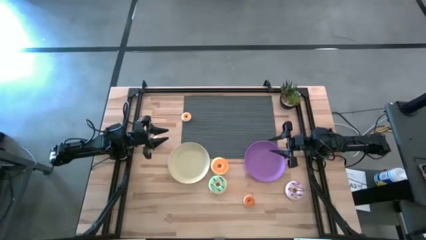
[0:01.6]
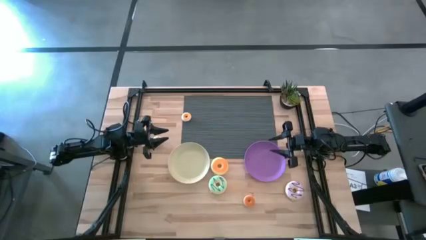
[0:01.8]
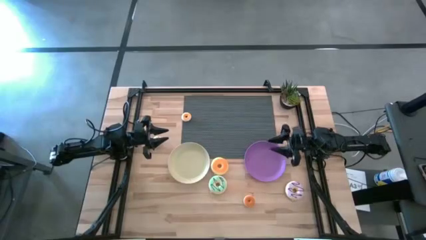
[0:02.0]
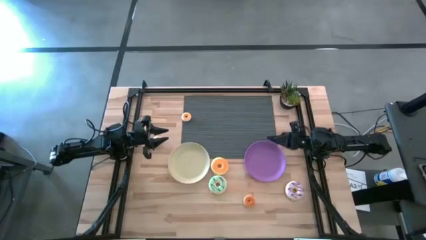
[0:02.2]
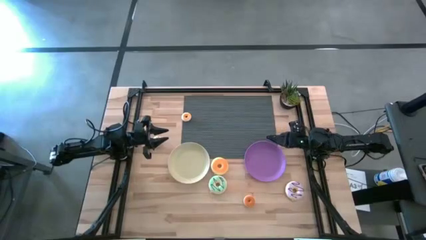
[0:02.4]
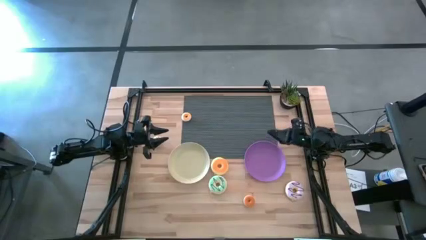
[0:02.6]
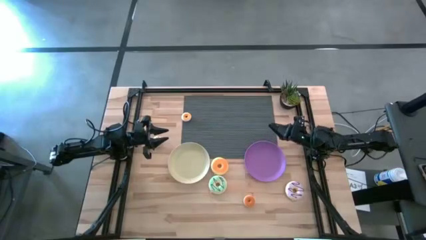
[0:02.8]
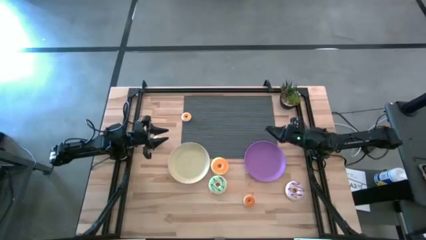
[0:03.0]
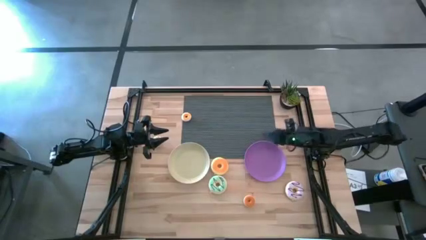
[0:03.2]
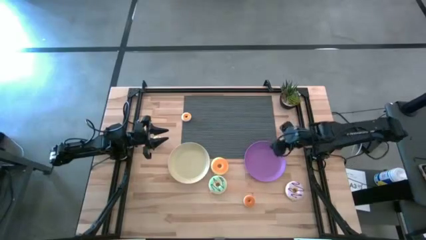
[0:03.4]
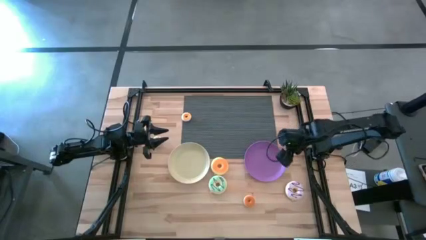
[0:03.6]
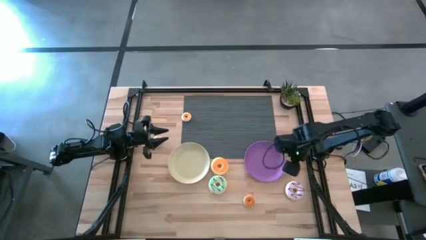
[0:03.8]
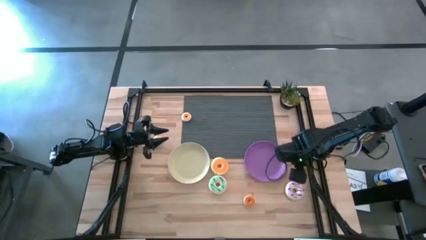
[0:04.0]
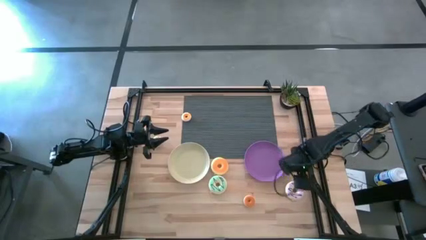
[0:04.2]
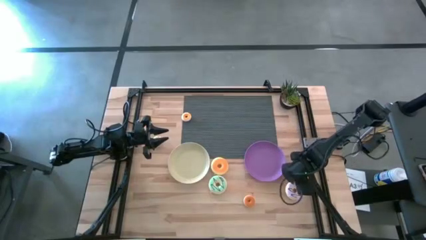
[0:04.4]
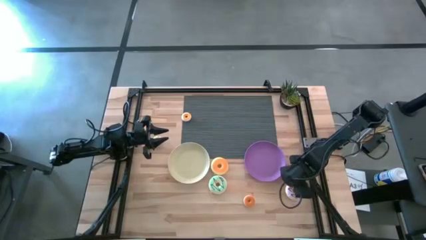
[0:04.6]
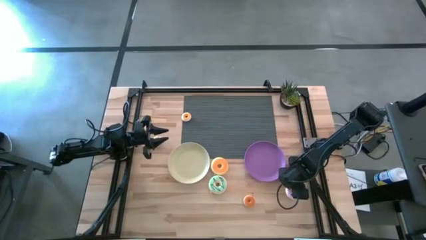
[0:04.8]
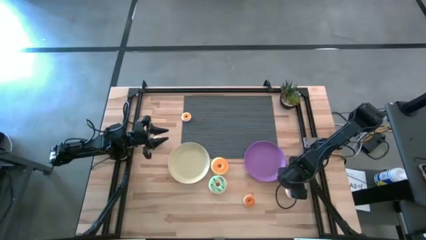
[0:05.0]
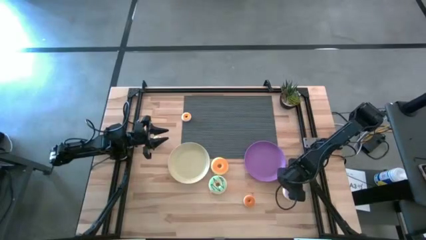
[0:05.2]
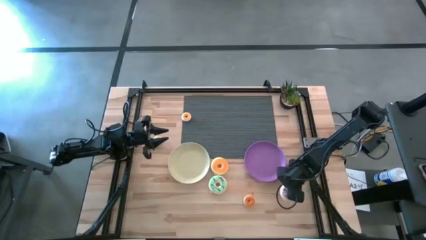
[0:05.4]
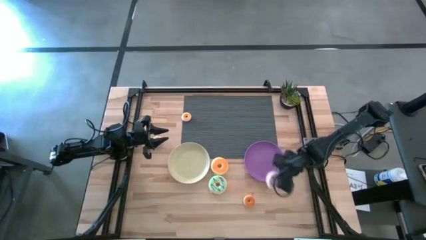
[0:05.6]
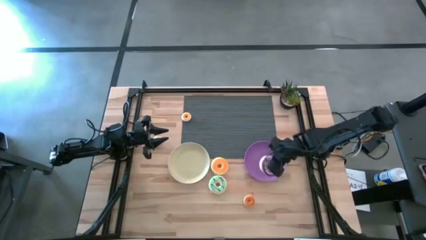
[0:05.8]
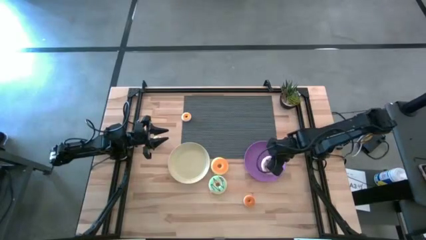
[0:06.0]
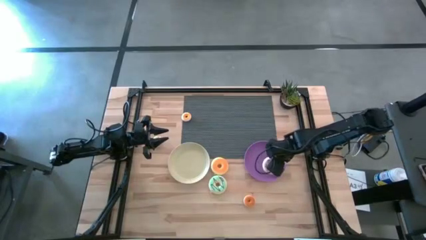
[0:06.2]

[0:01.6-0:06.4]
Task: Pick & Place donuts
Put the big purple donut on the purple plate

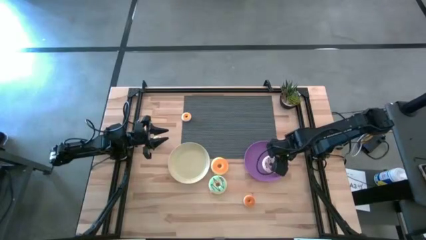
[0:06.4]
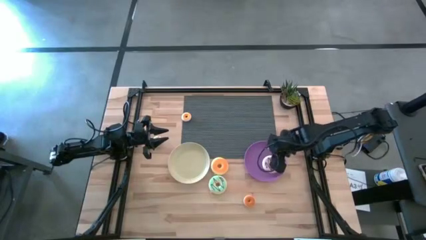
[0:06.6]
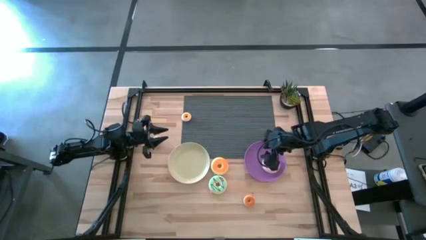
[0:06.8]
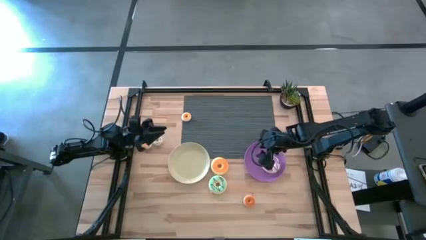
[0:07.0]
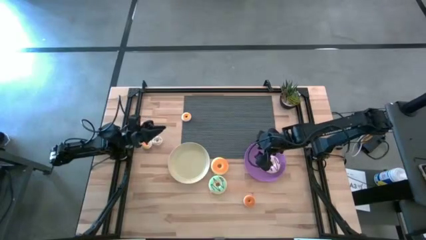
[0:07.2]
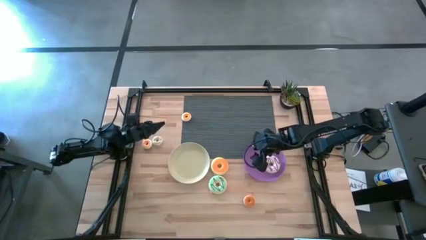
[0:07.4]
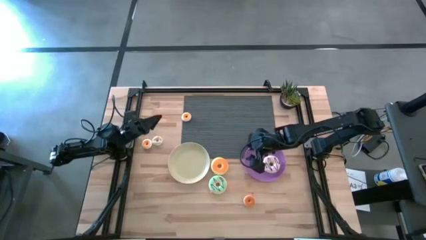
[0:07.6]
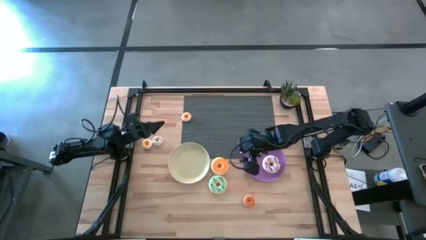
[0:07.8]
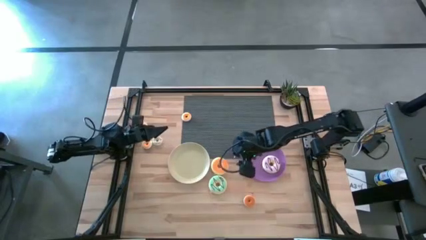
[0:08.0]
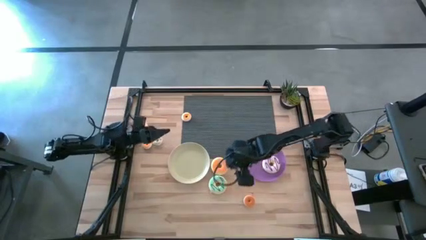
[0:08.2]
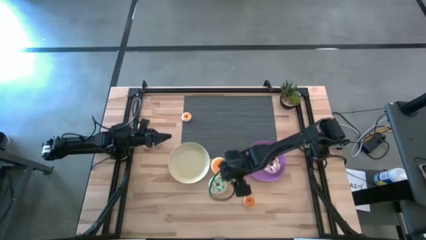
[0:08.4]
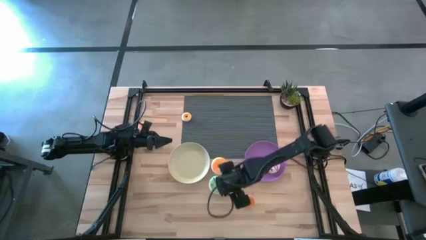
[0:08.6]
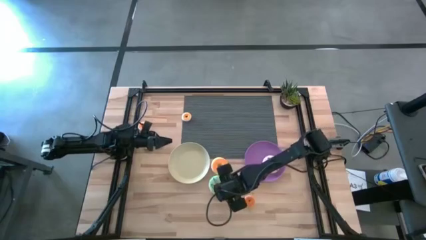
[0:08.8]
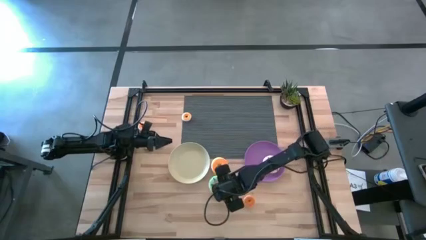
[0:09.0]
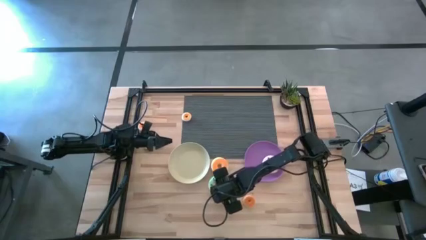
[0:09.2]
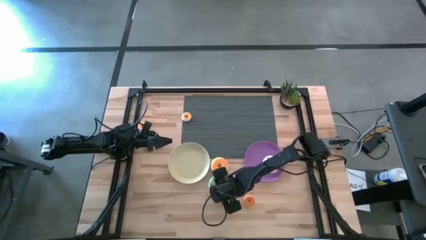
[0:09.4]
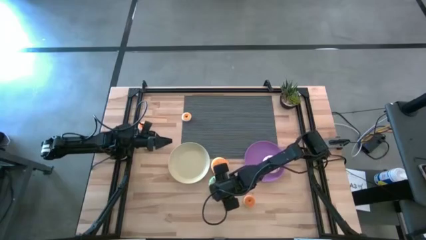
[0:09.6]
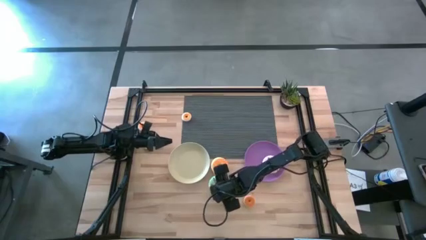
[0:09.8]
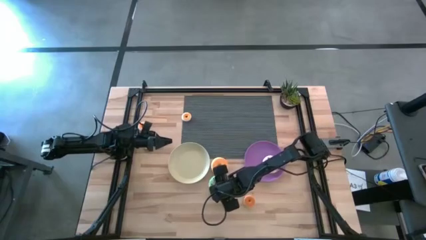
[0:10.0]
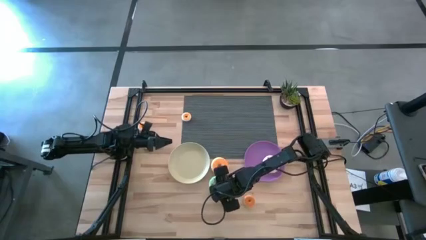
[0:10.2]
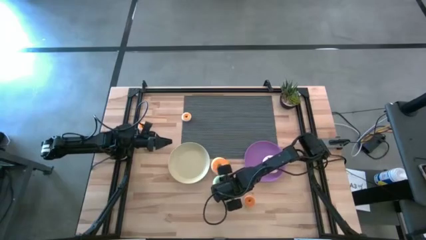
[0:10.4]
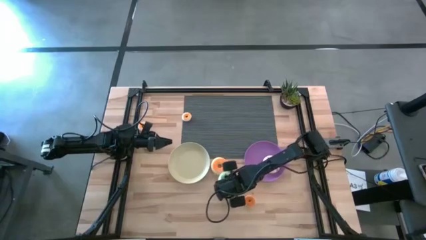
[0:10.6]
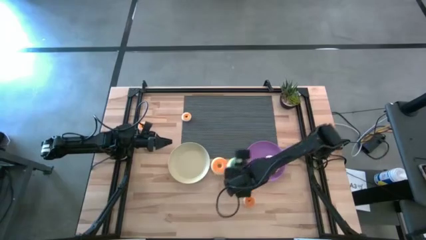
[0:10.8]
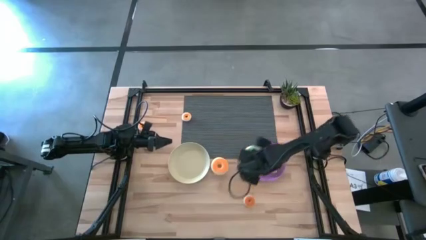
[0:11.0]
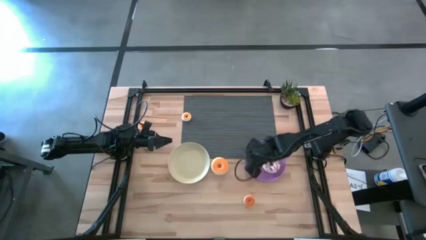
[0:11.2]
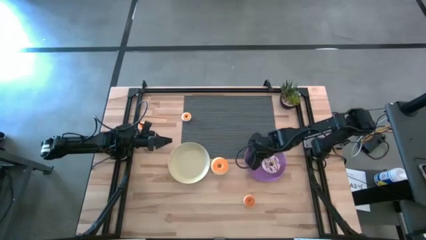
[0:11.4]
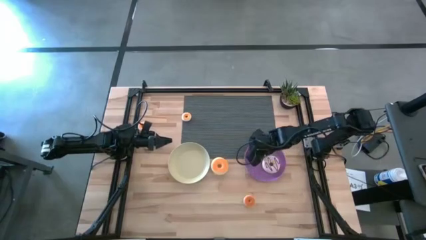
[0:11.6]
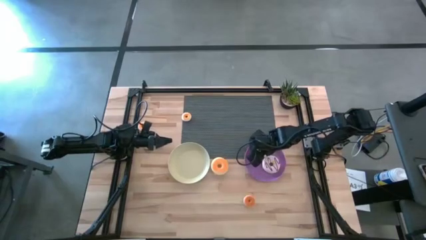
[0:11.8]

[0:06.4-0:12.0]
Put the big blue donut on the purple plate

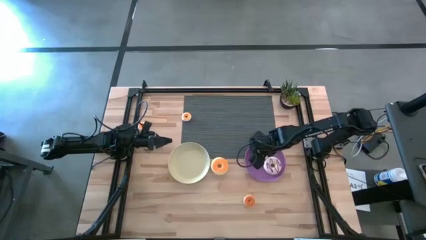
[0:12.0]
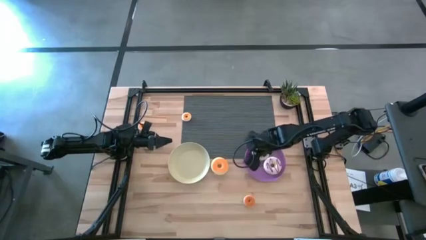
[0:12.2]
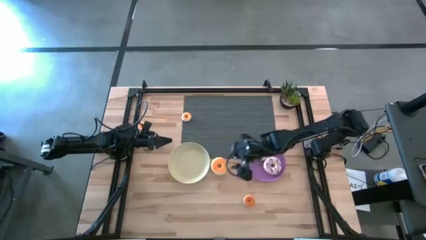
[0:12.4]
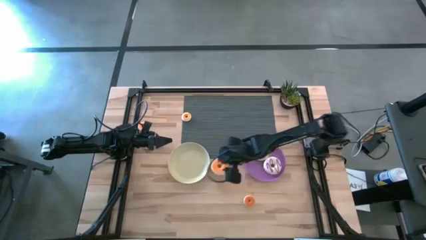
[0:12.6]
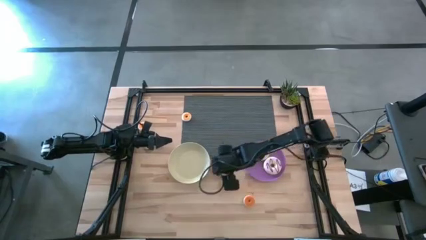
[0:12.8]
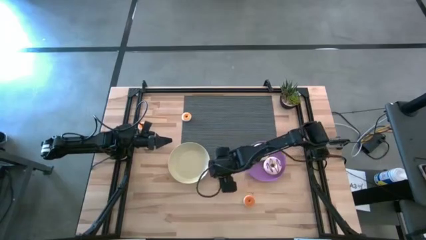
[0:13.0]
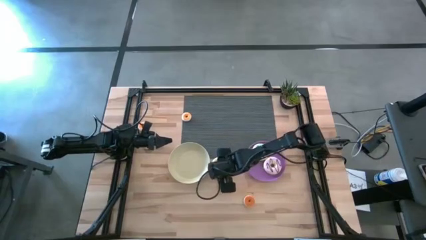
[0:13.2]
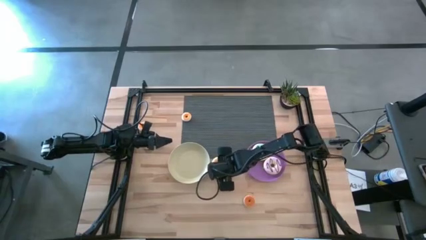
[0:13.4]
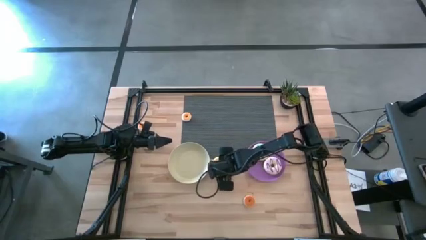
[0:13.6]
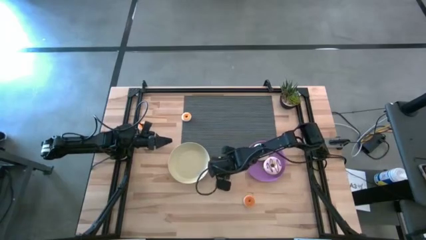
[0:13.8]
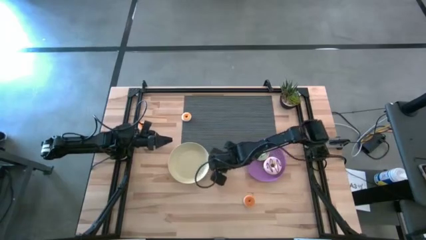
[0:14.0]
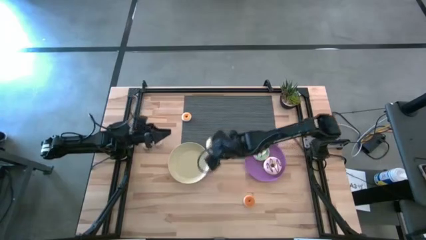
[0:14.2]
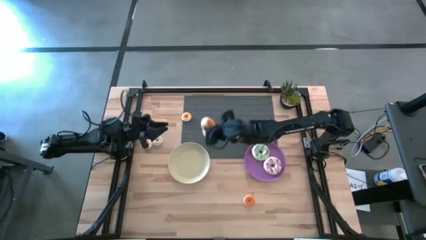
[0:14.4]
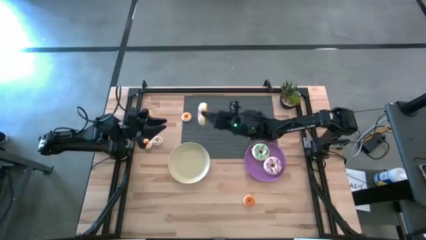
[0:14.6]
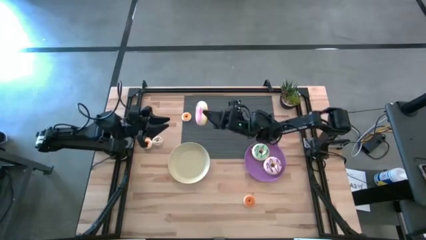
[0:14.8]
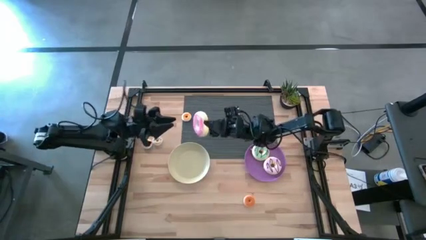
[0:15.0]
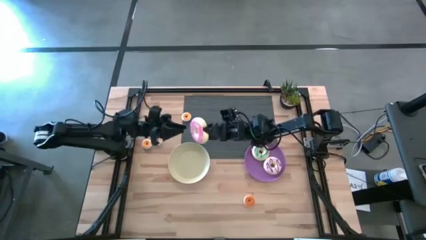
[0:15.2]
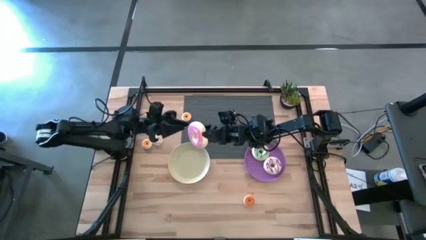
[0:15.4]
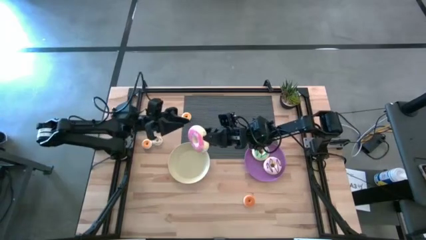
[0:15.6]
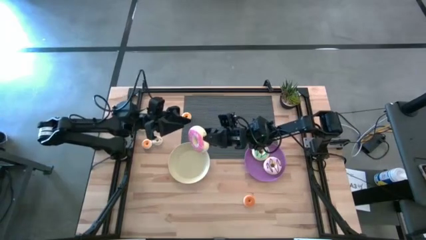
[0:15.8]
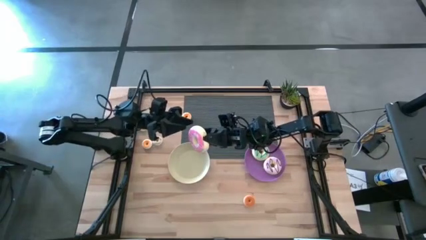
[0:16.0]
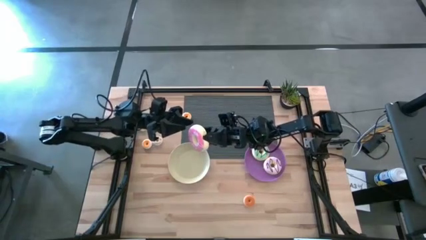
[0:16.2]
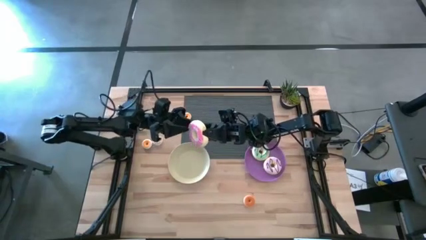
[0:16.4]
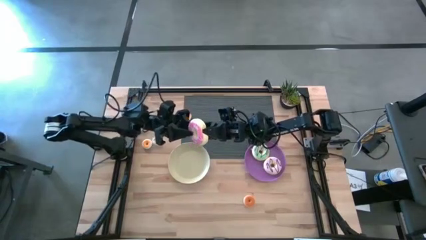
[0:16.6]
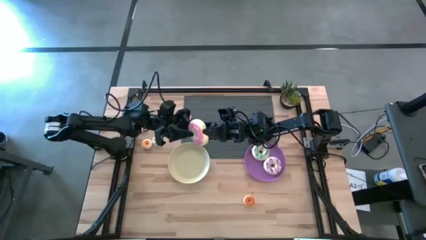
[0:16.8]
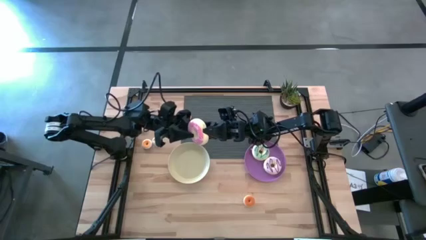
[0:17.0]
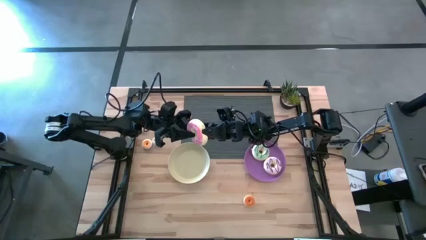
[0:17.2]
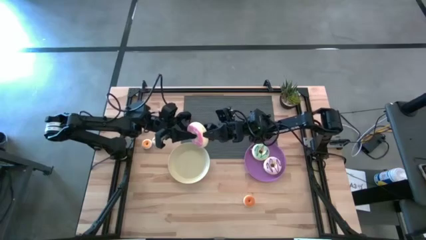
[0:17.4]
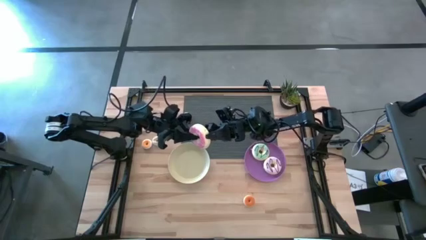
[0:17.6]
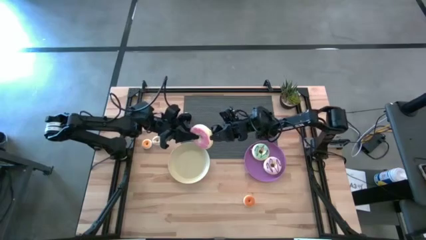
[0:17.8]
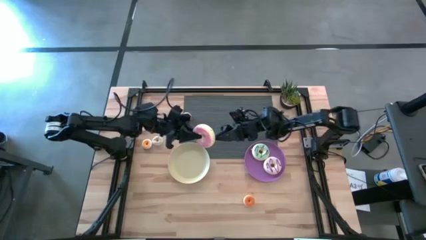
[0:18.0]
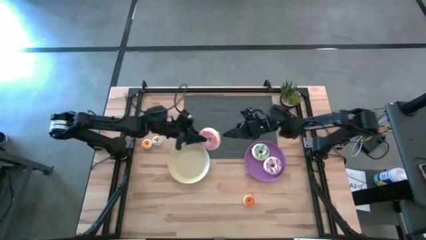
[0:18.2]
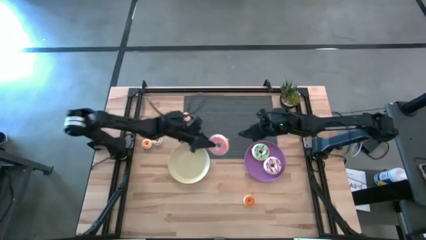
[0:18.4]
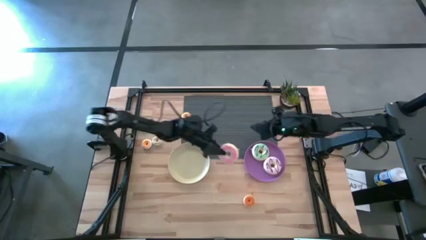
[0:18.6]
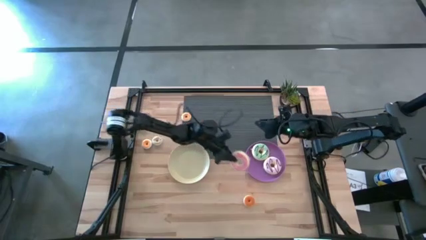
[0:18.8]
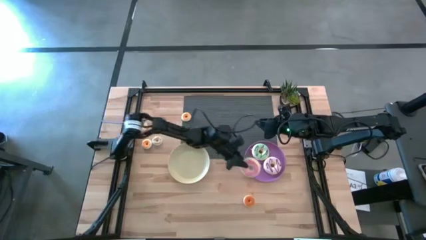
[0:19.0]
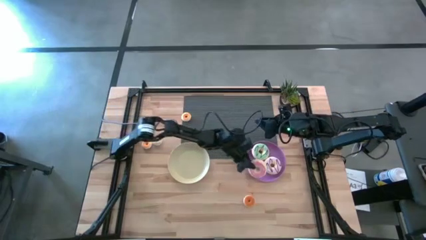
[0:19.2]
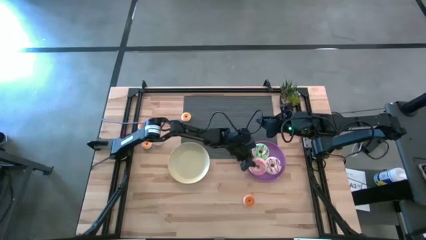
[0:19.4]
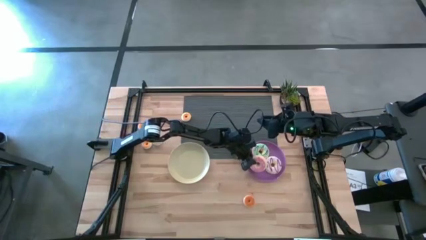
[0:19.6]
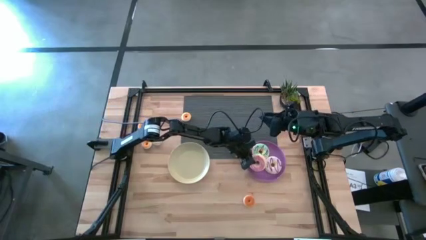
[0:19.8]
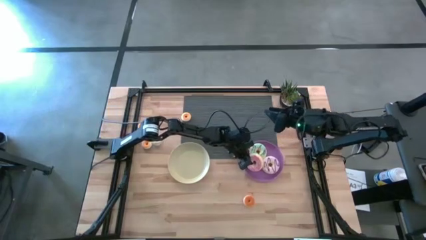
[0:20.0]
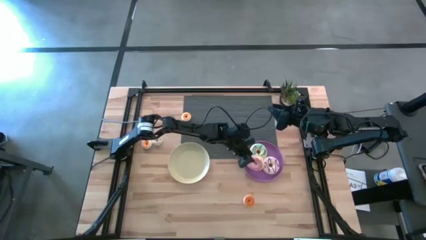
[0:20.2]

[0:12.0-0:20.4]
Put the big pink donut on the purple plate
